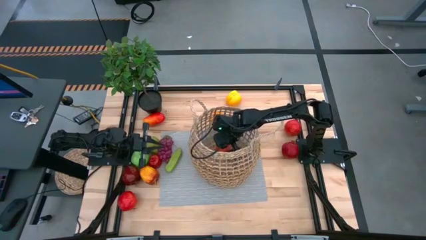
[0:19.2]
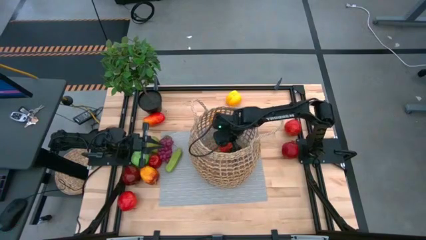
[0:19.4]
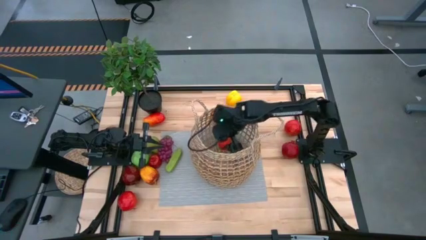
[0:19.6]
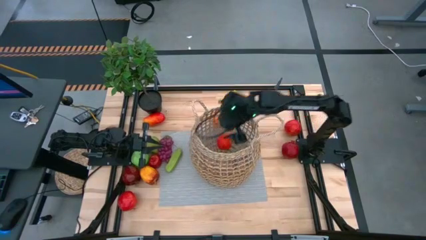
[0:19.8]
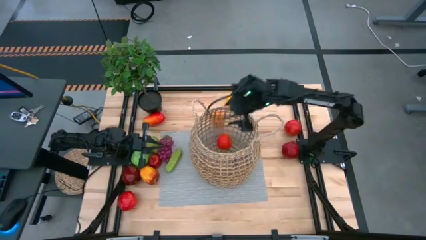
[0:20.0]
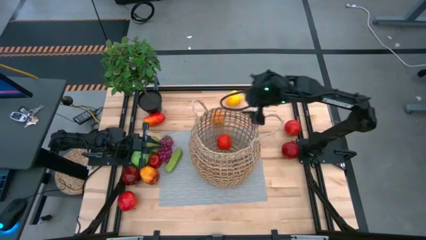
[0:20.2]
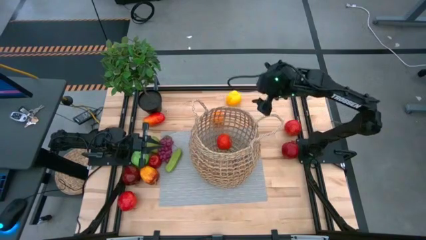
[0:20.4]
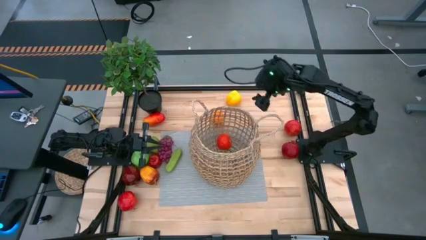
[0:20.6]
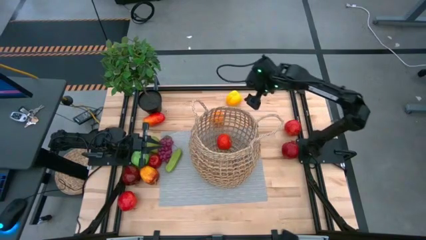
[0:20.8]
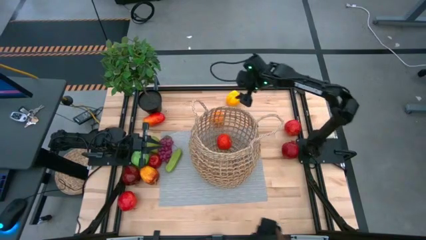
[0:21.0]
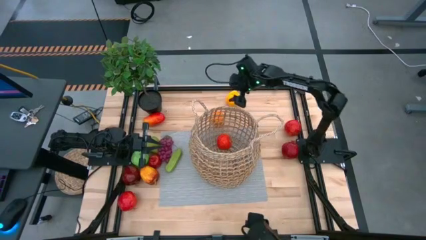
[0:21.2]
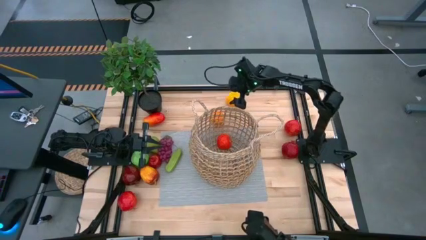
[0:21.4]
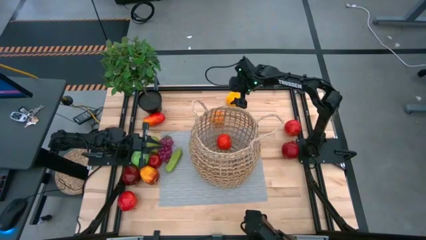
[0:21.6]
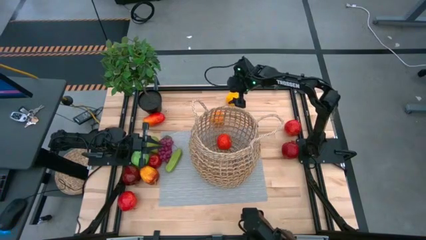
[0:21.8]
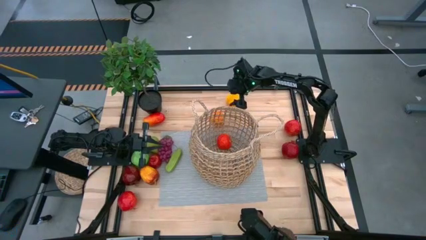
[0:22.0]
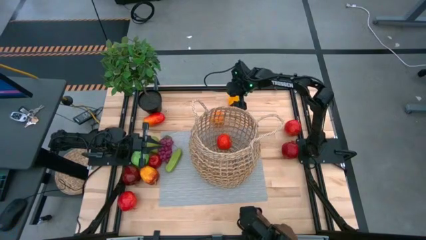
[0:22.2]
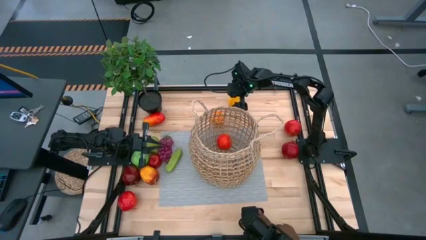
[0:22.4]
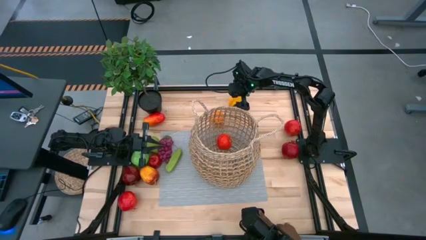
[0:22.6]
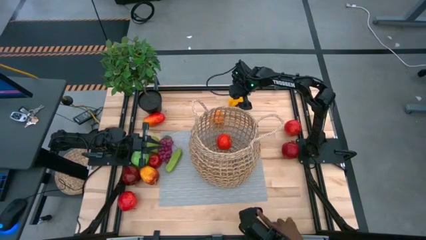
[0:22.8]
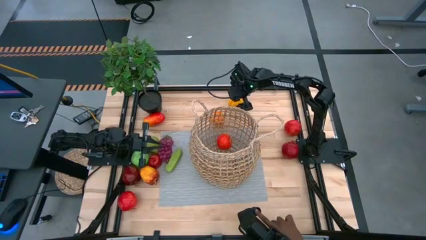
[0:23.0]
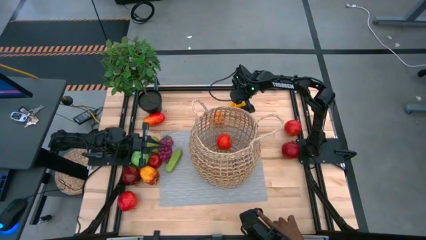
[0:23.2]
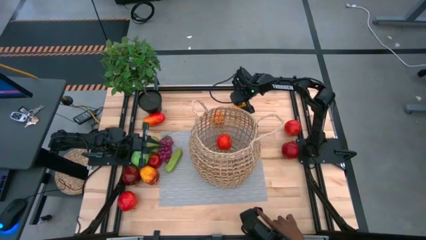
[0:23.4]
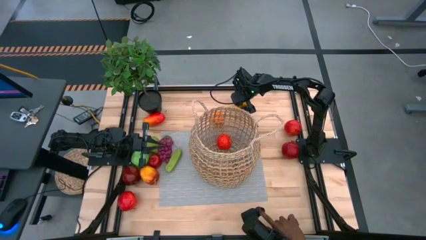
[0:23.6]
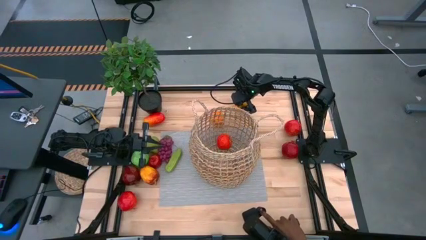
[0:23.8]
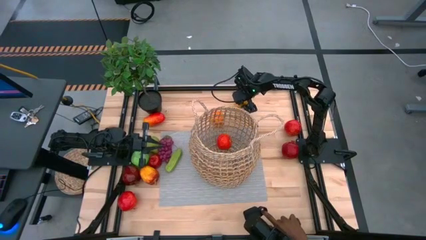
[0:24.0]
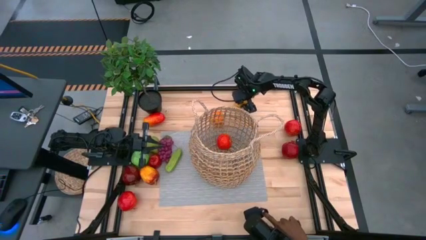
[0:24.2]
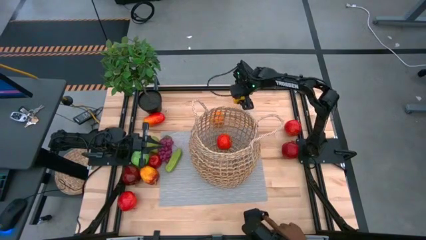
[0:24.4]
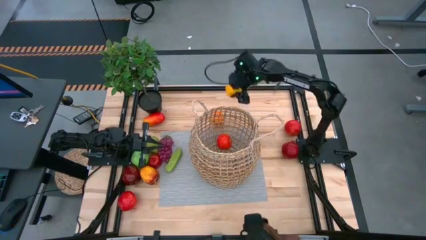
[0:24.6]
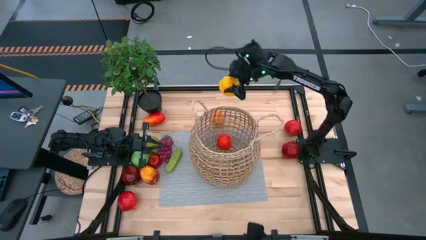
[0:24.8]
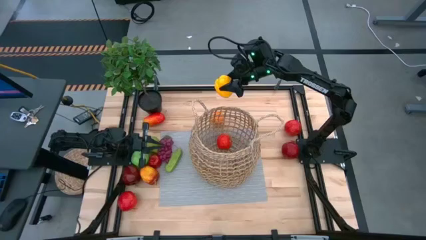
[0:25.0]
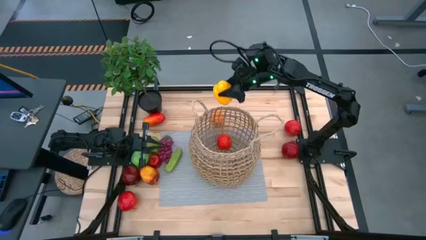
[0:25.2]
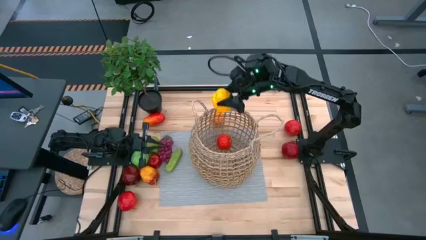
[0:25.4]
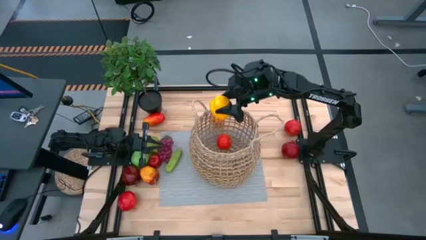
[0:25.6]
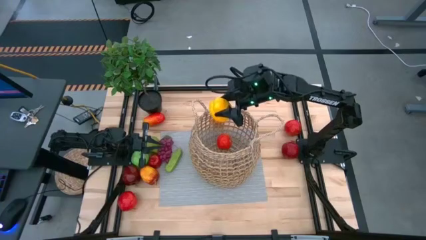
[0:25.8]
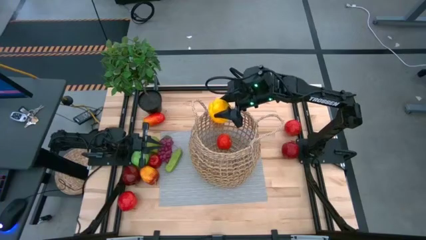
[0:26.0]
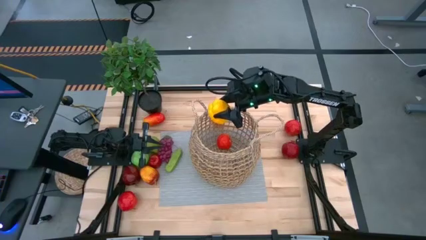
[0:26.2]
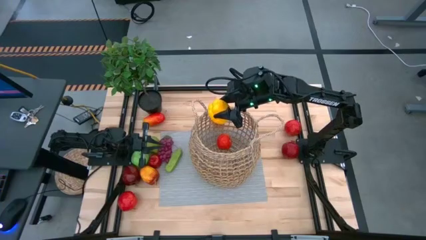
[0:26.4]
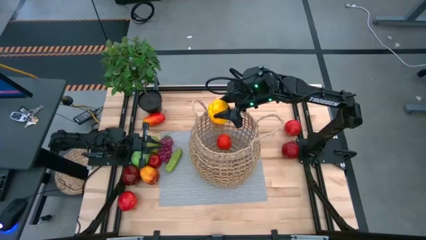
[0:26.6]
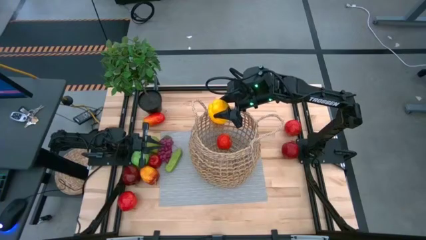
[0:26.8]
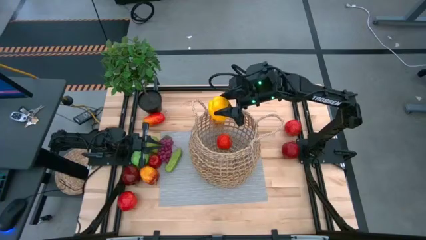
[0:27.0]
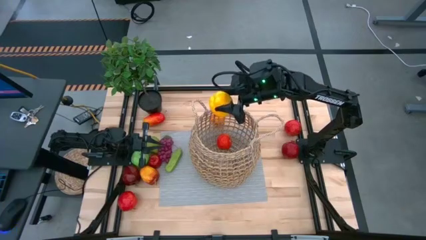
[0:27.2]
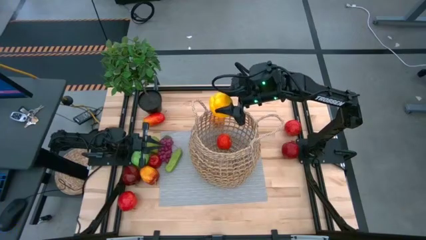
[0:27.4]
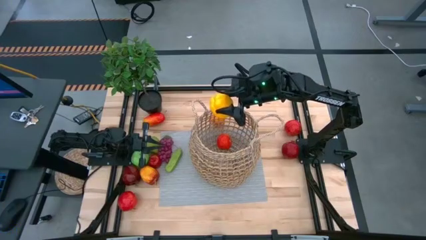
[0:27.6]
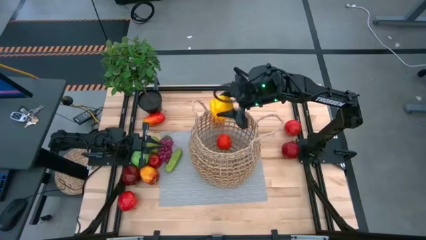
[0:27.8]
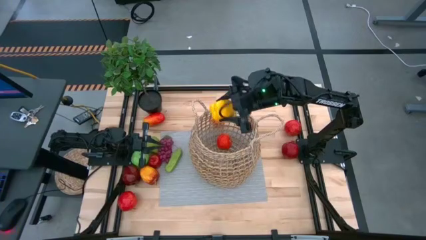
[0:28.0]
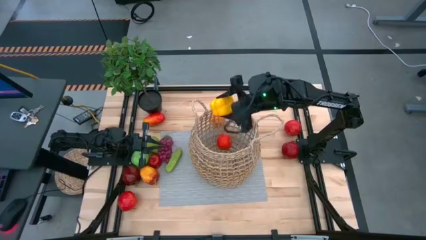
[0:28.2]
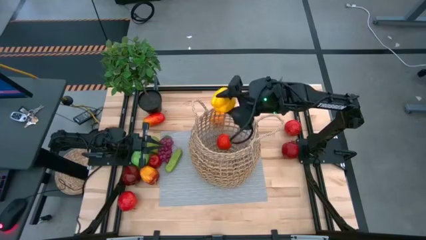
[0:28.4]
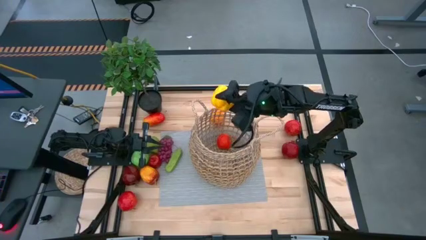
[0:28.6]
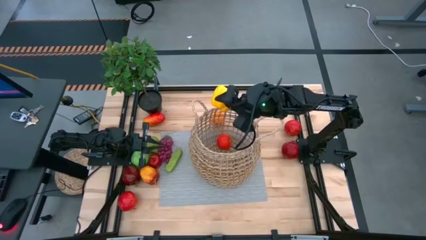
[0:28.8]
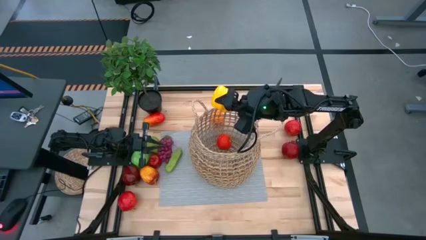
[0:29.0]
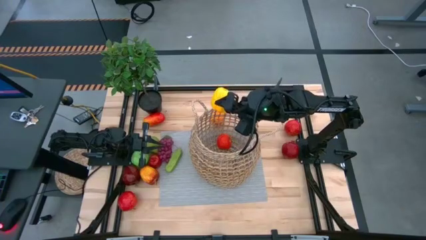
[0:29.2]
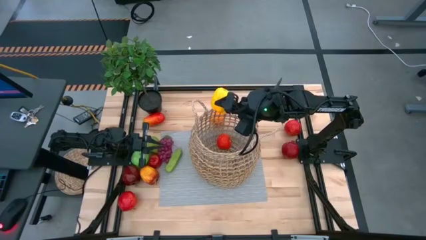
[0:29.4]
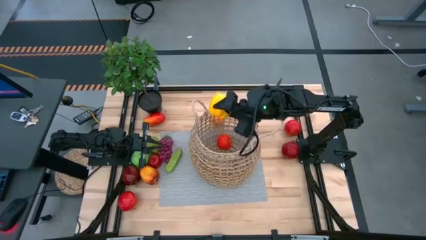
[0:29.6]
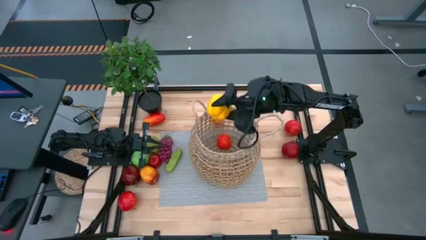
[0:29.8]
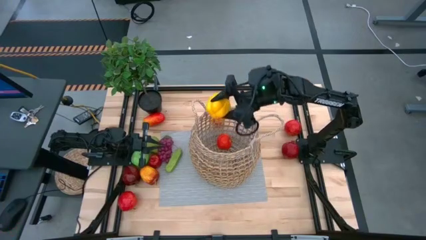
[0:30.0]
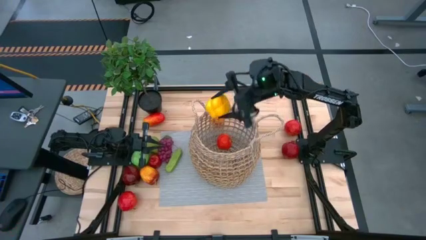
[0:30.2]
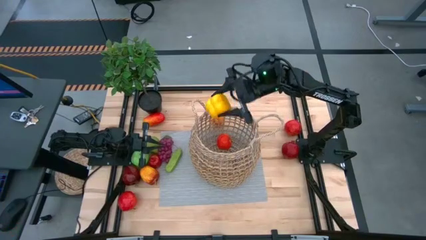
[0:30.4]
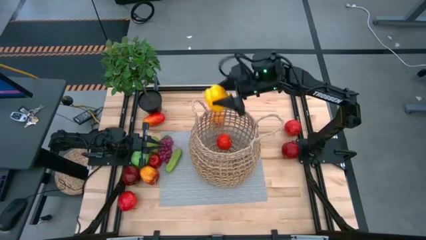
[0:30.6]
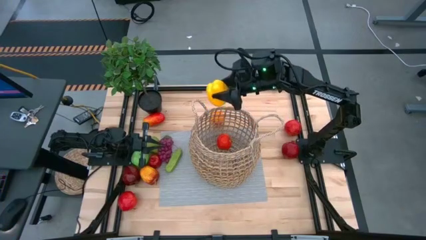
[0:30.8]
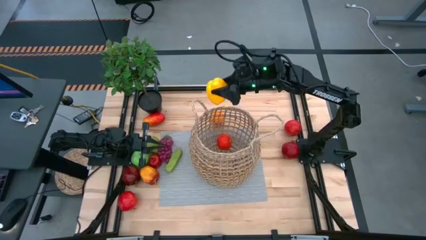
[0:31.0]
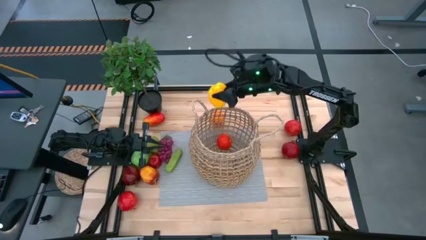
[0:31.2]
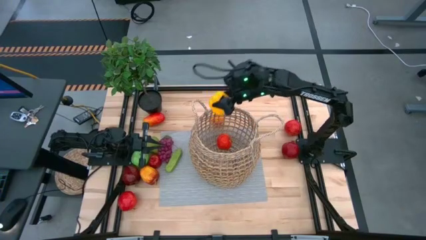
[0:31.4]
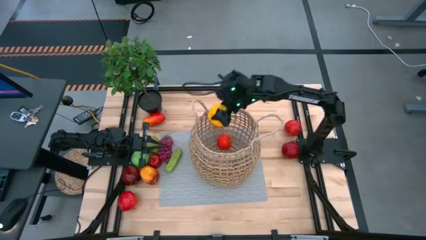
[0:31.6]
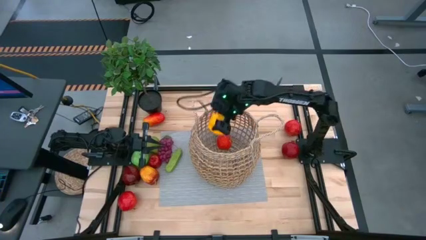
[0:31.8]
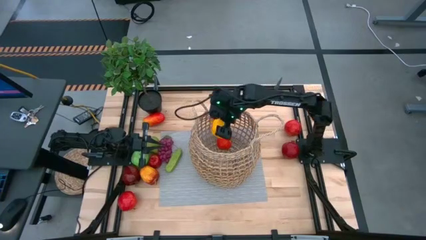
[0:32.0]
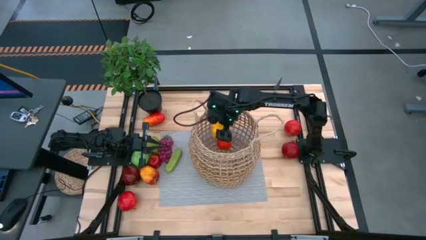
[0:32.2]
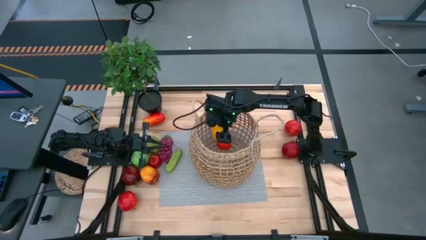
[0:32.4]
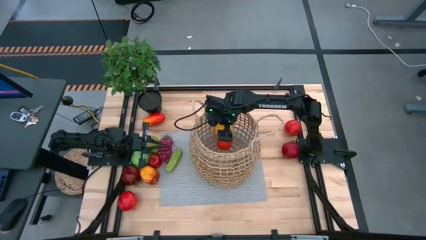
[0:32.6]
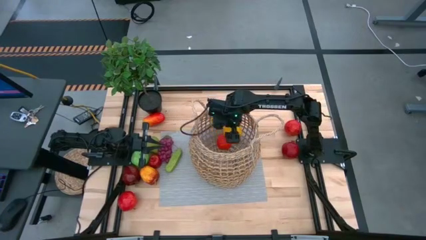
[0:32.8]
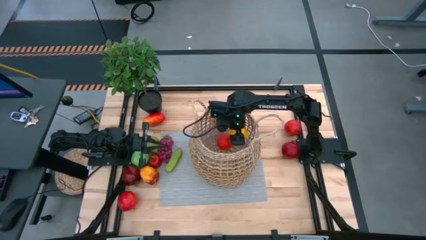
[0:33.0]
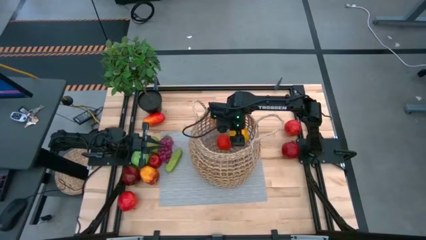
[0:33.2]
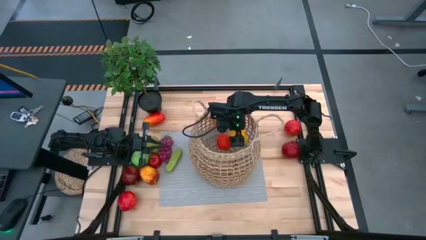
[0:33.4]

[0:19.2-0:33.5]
Task: Build produce basket
Put the yellow bell pepper into the brown basket

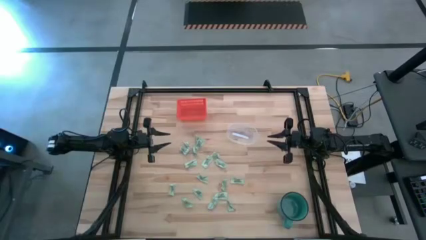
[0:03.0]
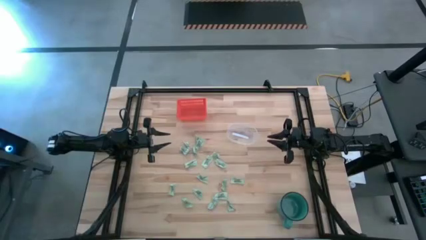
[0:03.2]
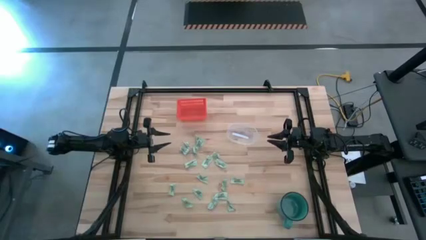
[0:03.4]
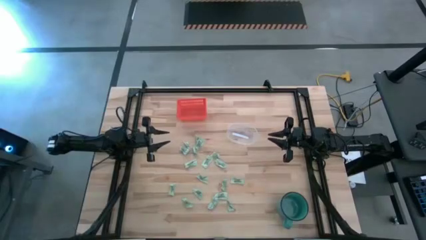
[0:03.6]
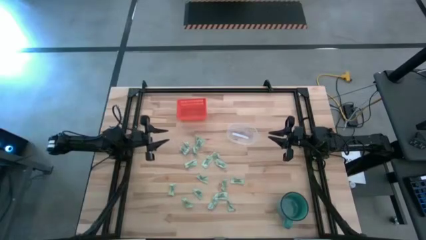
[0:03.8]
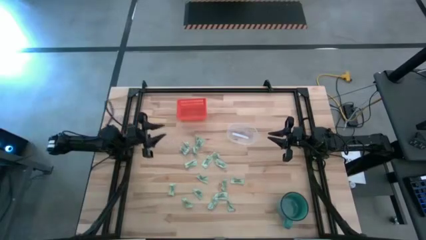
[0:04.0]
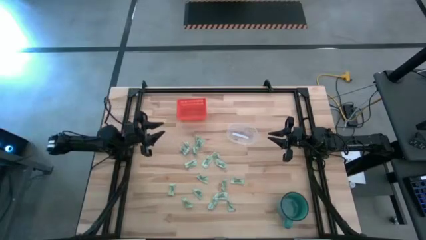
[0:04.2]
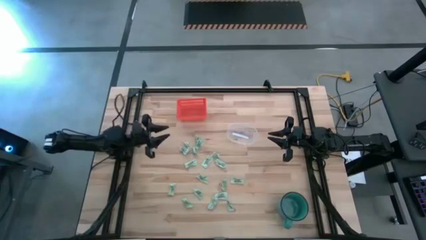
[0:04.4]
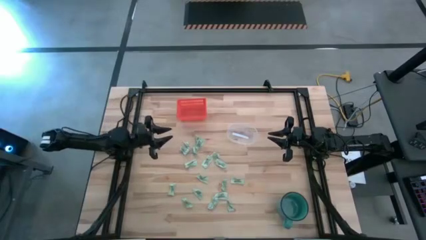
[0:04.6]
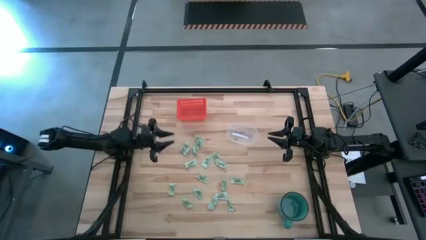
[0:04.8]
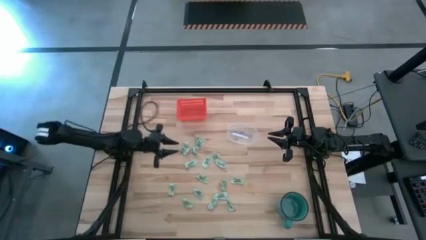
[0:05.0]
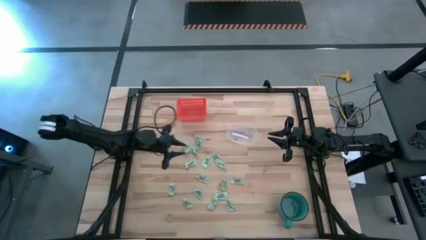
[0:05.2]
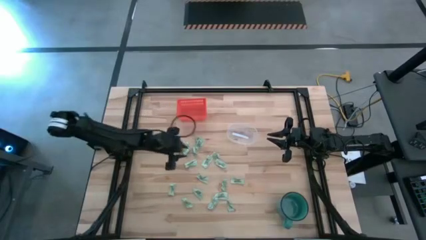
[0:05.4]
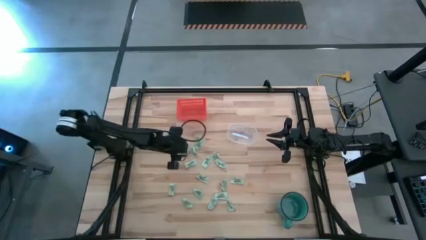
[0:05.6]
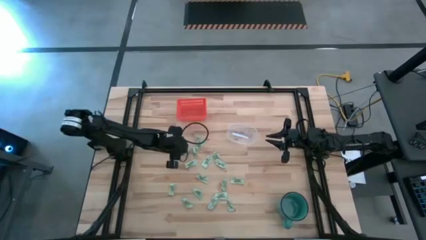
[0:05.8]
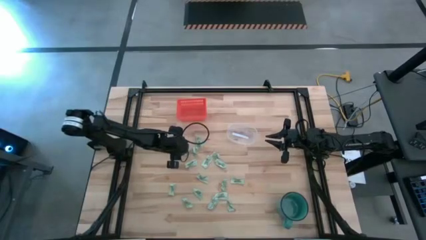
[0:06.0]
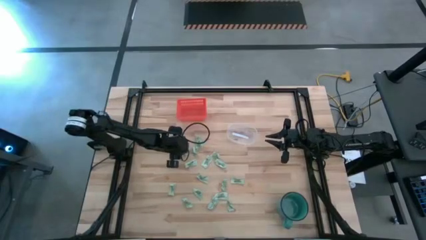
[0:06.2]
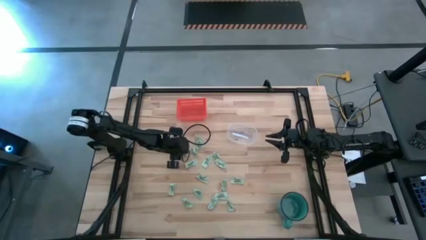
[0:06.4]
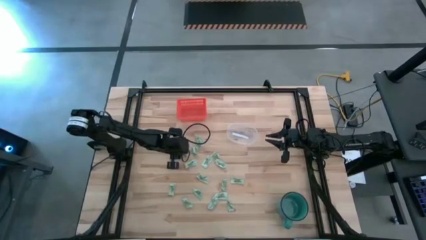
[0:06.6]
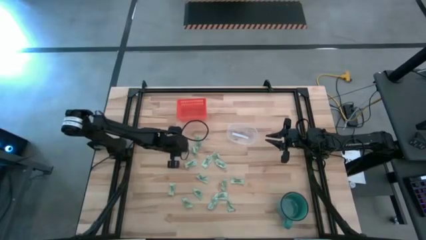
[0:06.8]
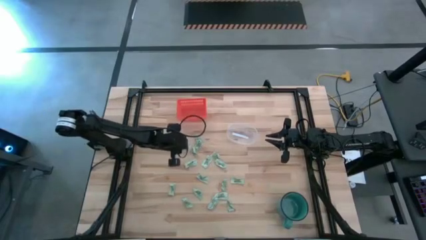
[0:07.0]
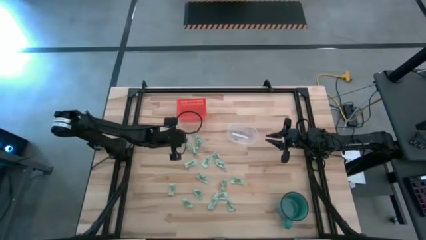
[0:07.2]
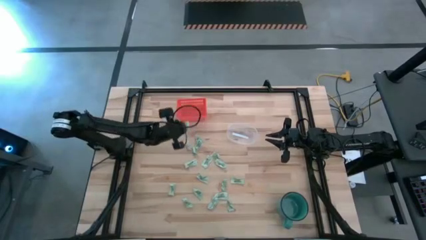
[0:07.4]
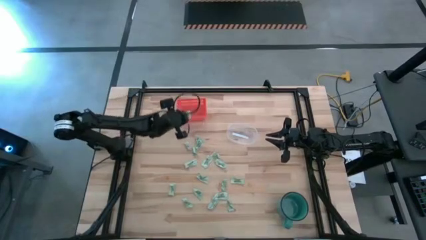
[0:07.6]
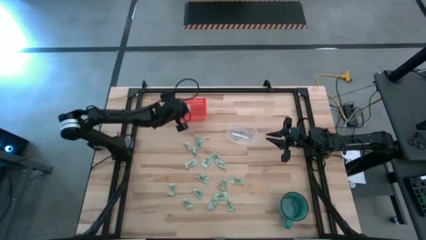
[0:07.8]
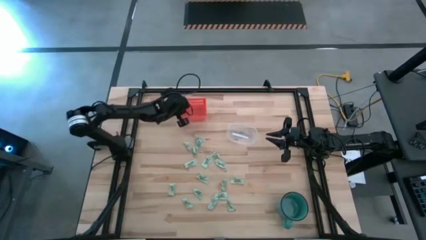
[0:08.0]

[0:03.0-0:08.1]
Task: Pick and place items into bin
Put the green stevia packet into the orange bin
